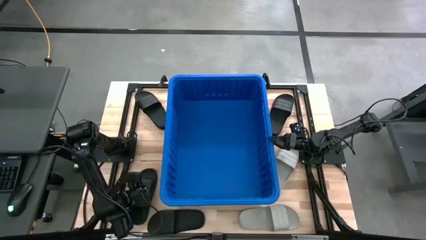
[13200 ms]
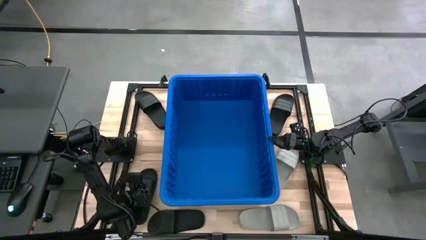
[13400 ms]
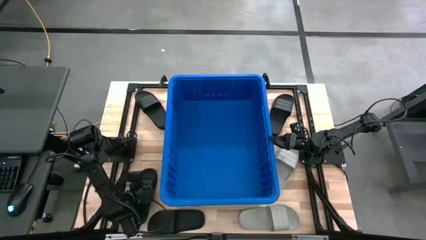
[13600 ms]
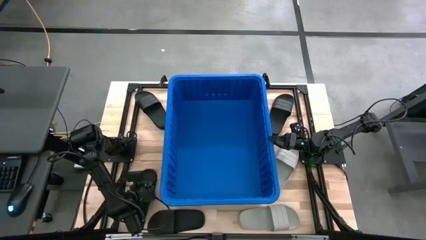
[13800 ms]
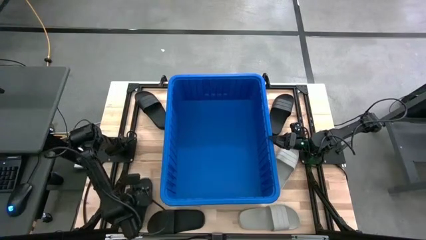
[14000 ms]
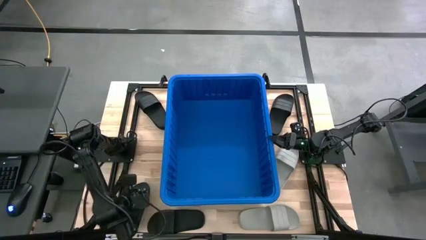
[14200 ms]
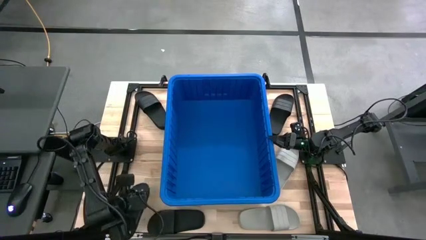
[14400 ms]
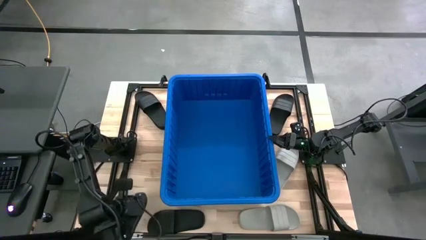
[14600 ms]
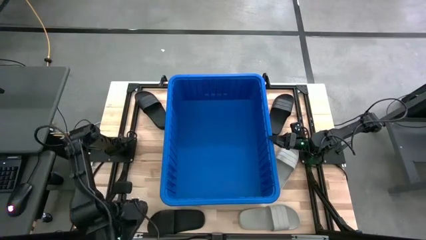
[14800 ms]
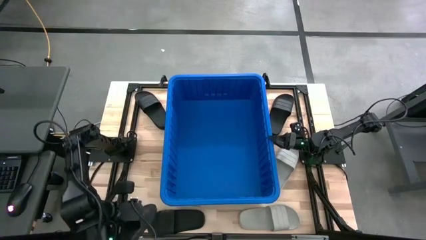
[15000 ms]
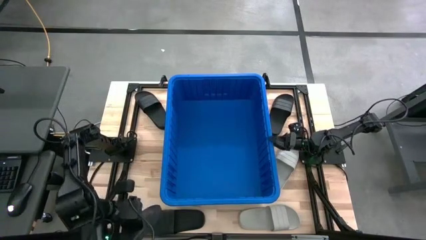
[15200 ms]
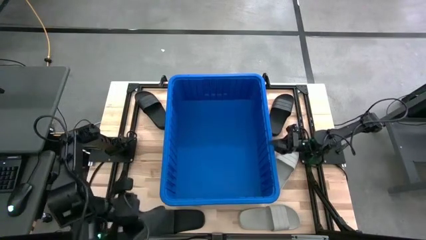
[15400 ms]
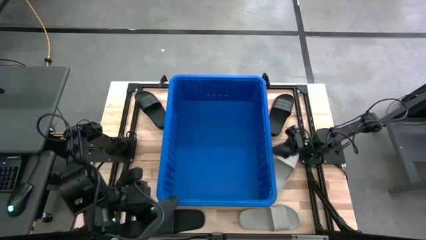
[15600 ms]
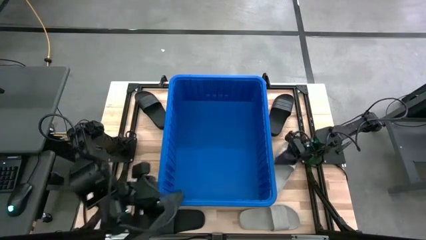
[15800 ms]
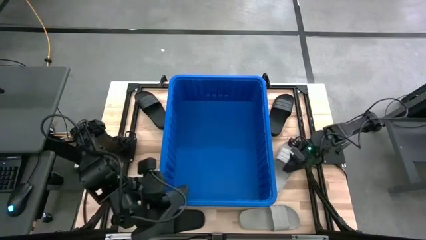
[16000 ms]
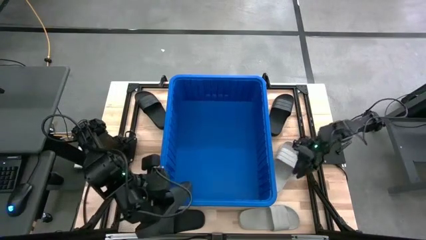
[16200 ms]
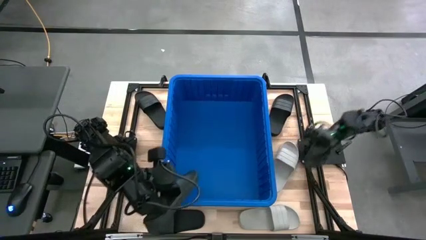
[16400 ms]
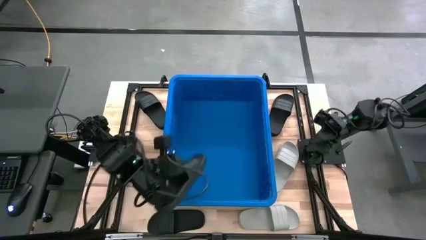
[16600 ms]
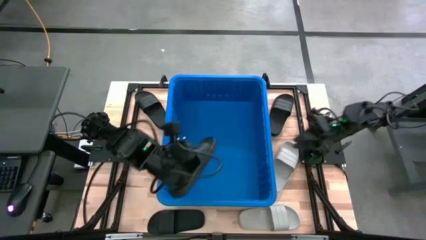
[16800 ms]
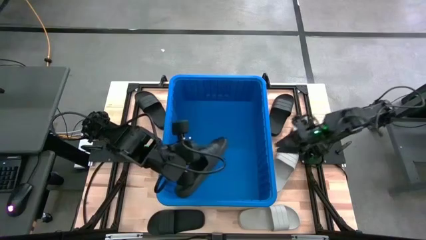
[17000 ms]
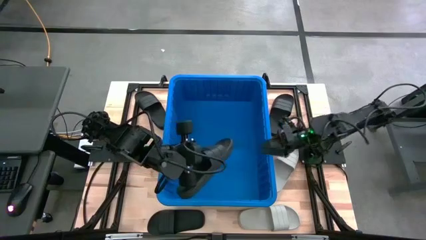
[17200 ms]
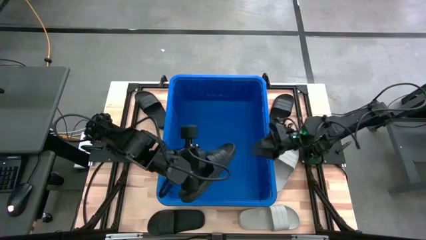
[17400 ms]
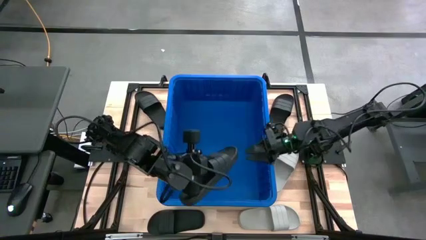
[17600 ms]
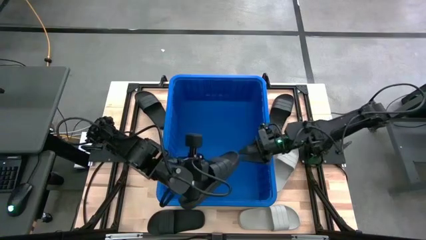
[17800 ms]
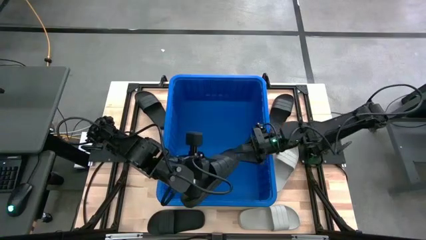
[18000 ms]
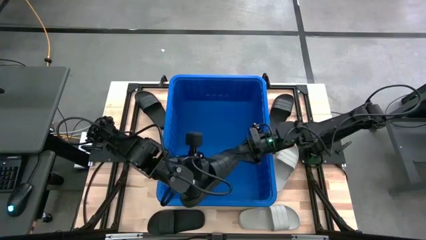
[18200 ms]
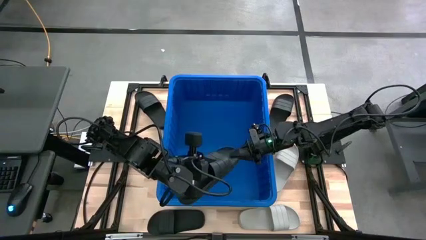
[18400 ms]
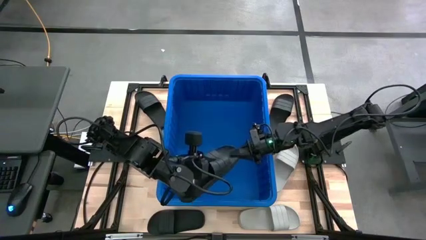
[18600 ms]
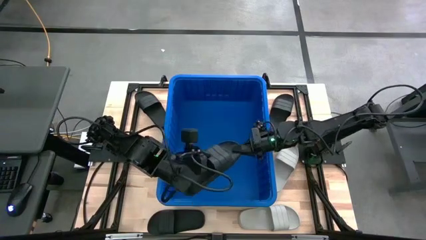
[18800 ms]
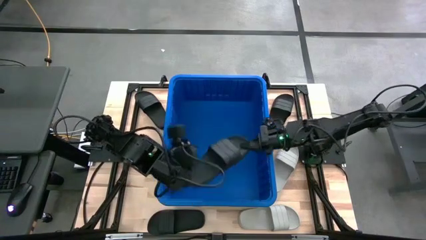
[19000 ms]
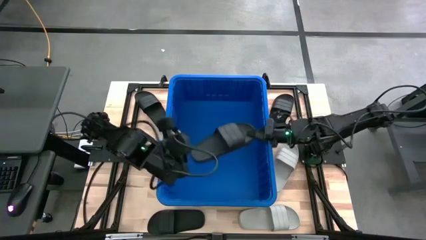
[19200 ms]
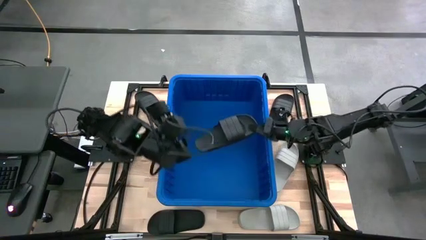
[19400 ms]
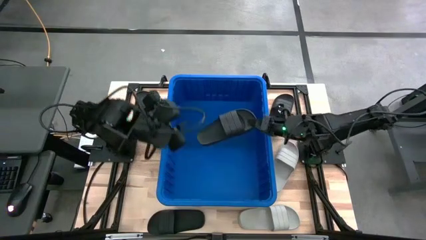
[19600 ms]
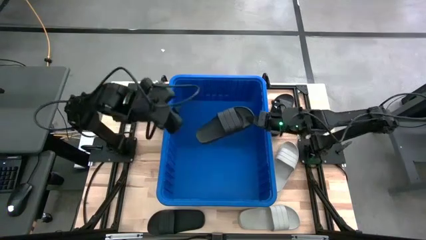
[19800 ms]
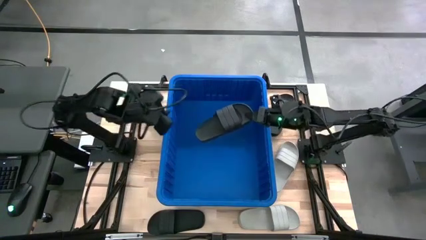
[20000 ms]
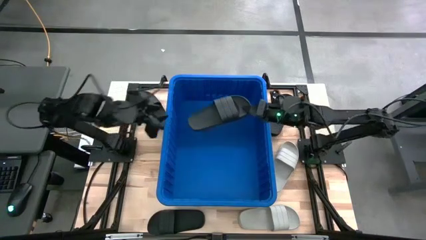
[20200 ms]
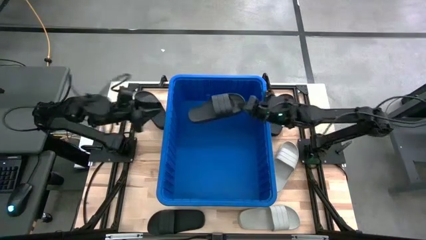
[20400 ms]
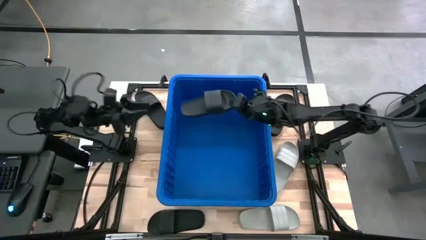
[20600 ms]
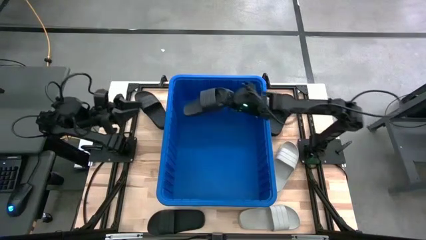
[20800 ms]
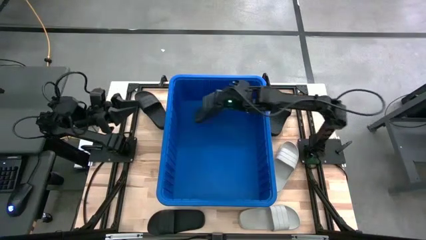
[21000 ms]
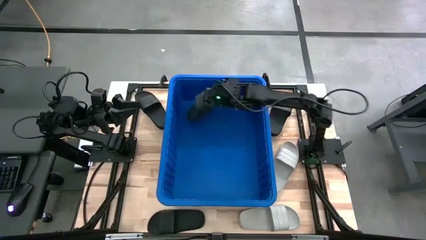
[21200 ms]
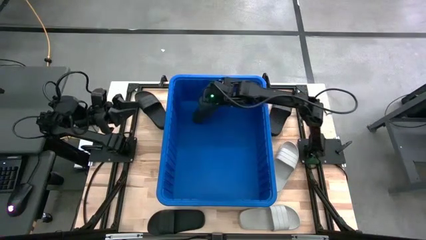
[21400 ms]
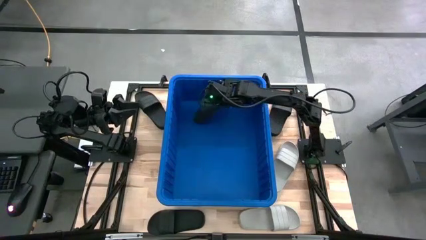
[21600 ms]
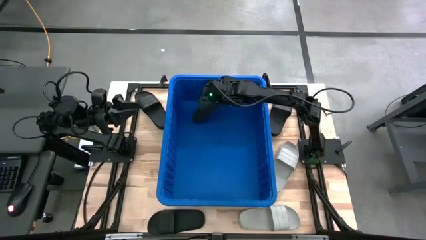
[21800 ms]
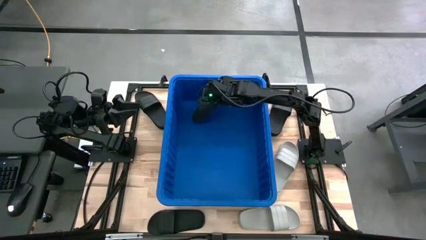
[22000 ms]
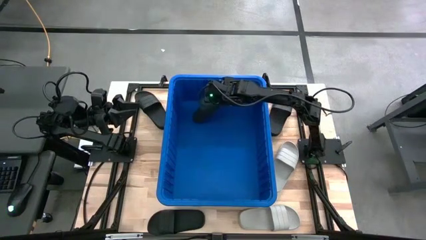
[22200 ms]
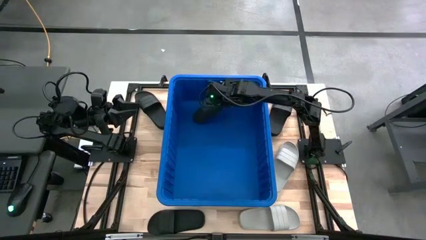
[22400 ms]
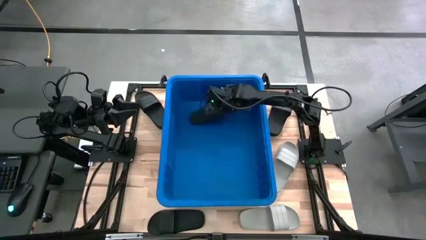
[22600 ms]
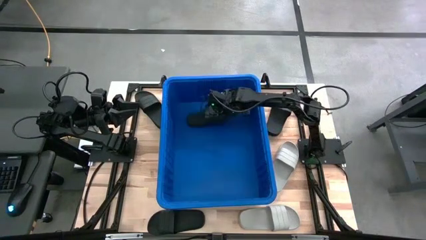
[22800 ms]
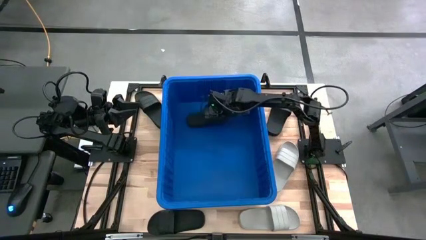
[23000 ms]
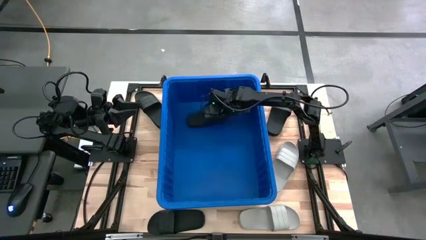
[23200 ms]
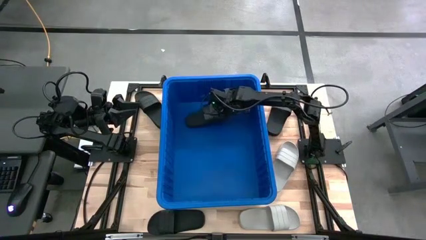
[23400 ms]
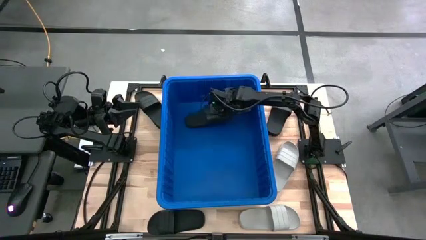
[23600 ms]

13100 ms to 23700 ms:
Task: Pick and place slides into bin
Put the black slide into the blue bin
